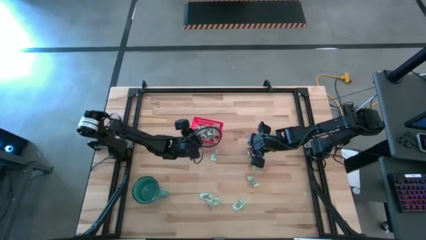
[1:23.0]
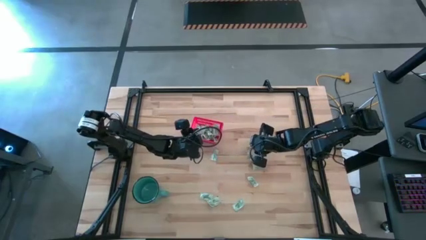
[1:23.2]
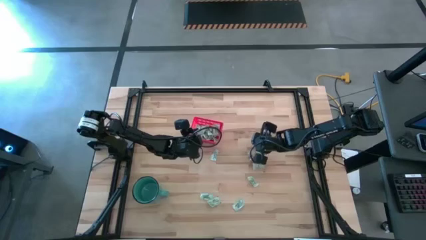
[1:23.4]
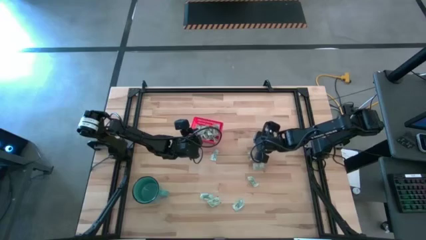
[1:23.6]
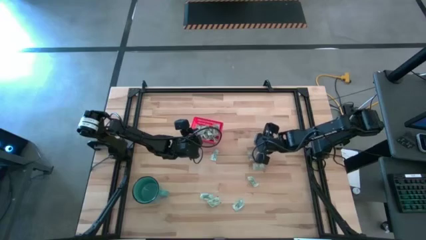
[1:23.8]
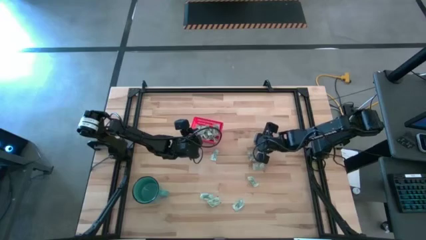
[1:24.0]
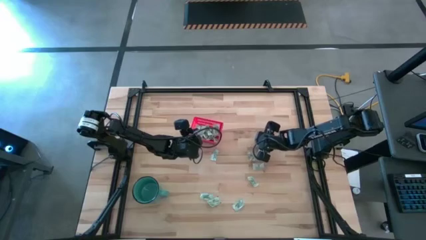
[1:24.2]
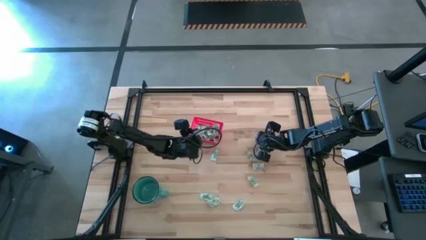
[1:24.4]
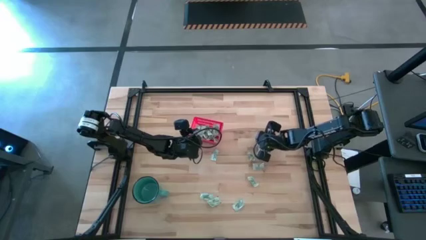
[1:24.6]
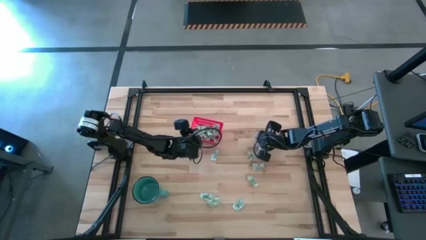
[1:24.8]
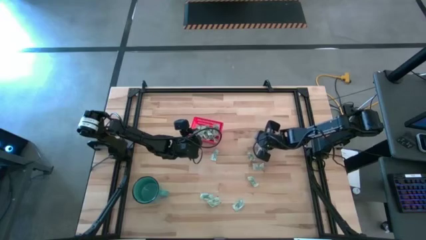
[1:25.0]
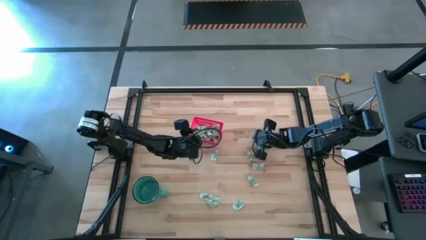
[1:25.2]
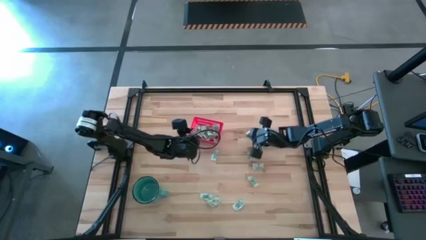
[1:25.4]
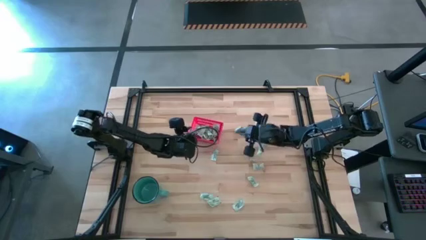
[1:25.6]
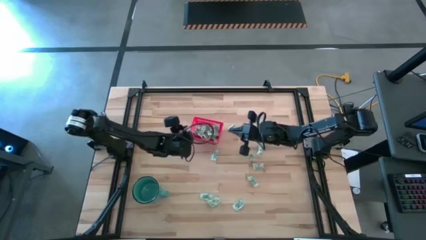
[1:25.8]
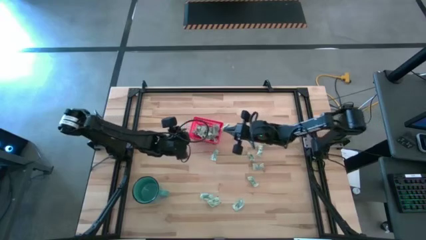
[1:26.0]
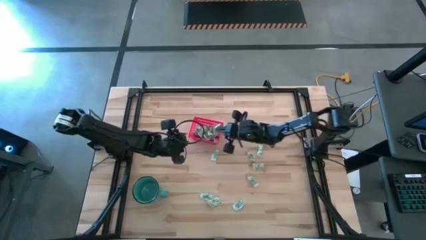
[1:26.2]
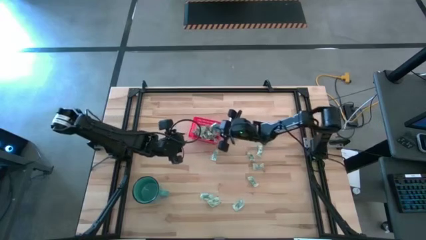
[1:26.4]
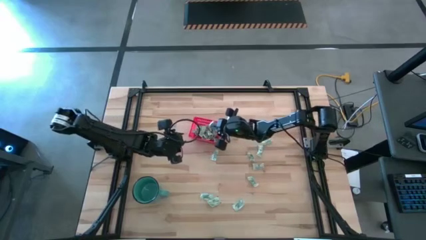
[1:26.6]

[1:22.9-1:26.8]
Task: Pick and place items into bin
Put the stevia packet into the red bin

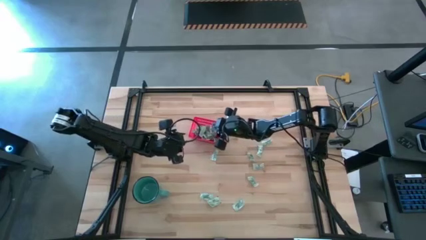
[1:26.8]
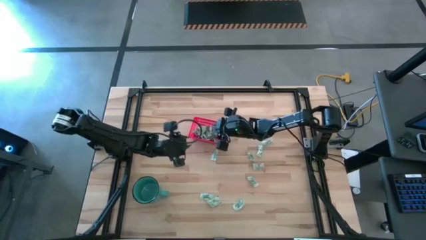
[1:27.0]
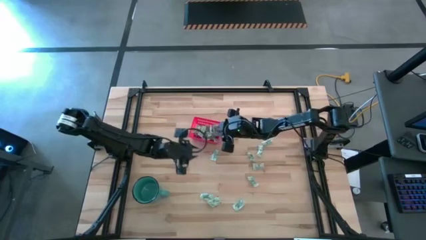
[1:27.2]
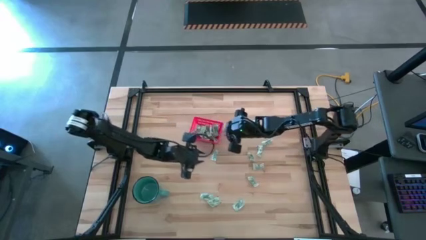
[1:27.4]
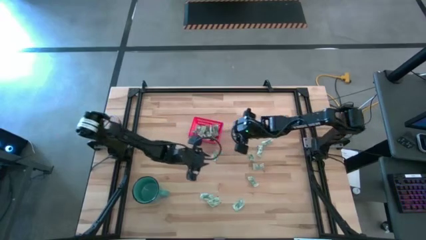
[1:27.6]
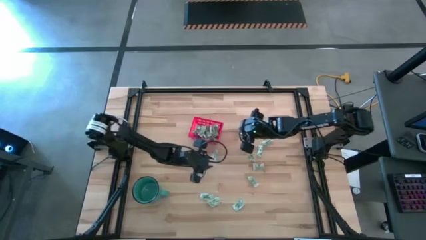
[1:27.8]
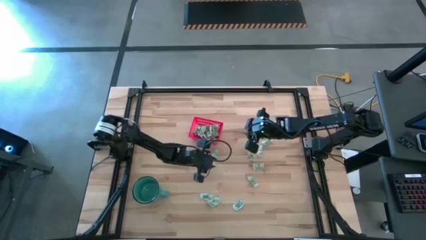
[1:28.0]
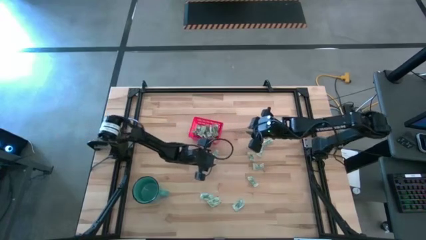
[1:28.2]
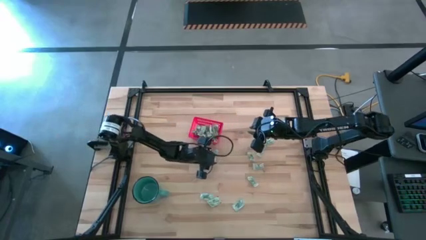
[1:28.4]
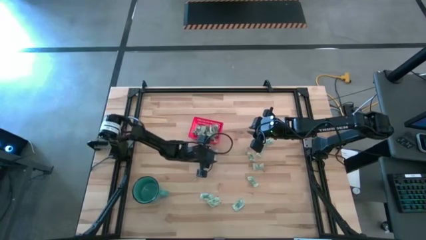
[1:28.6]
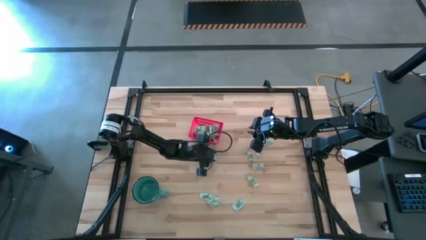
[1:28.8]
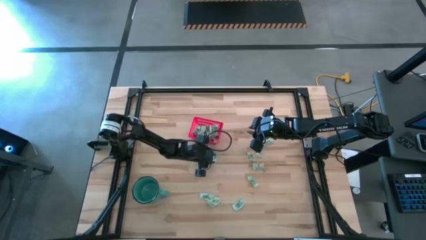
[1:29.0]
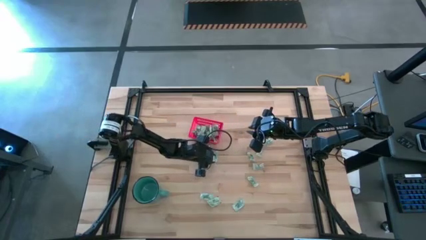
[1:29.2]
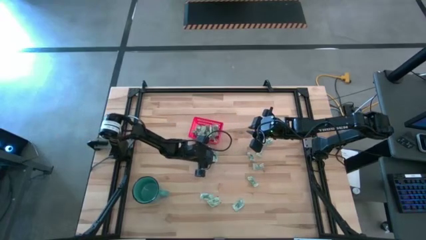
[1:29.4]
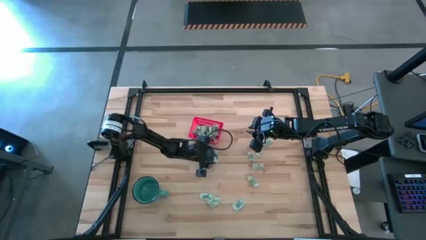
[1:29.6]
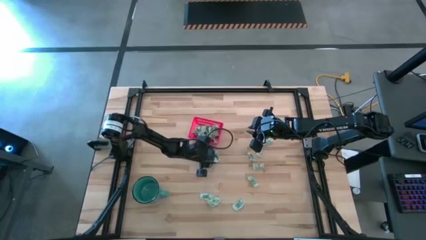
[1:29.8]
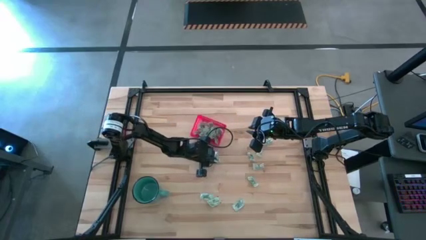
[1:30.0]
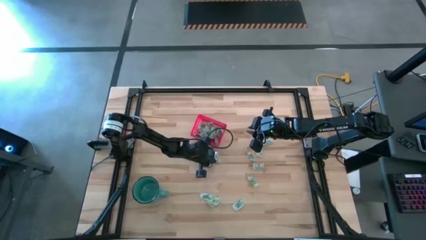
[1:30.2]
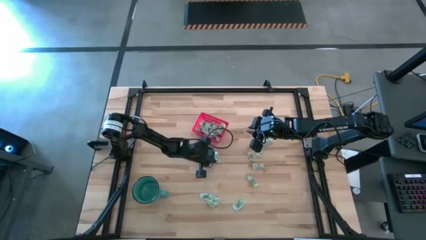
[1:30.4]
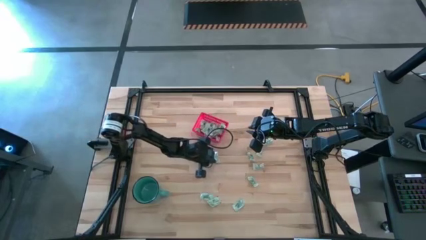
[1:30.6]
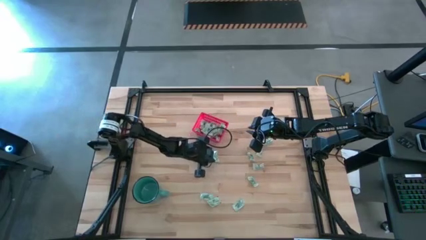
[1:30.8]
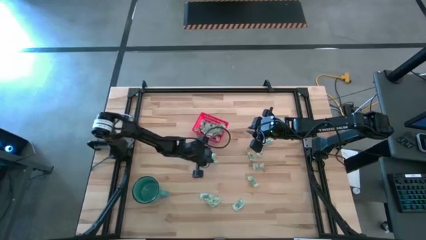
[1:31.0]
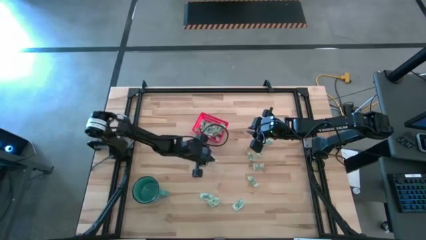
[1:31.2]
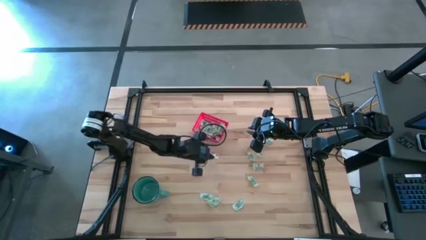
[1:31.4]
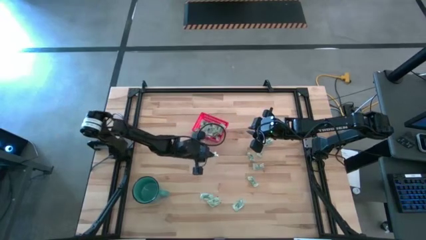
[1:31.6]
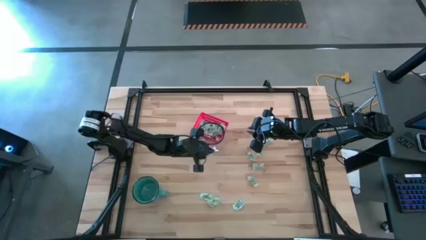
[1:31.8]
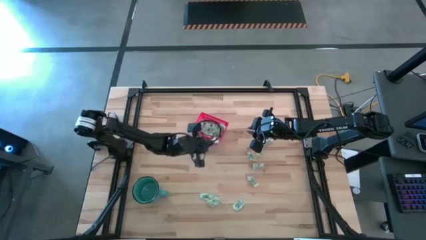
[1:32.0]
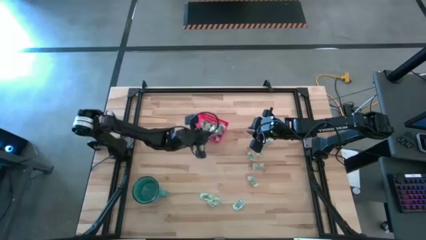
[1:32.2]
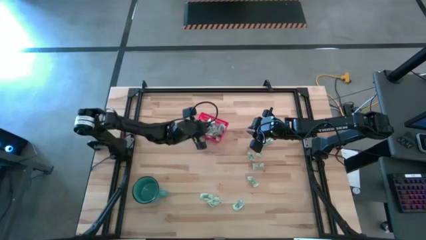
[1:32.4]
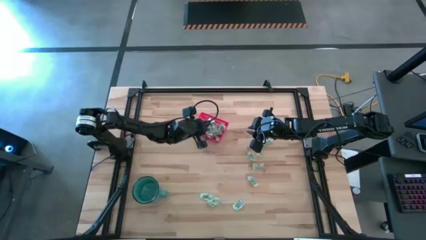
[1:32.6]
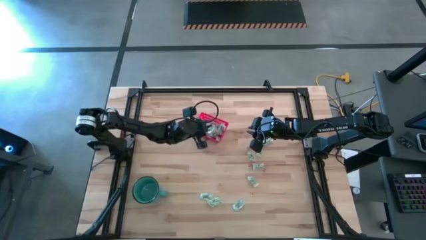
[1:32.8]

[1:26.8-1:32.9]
Put the stevia packet into the red bin

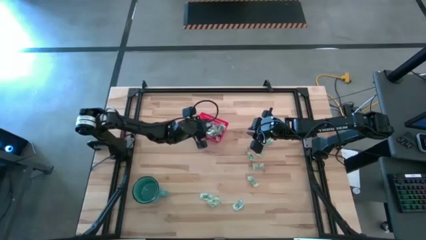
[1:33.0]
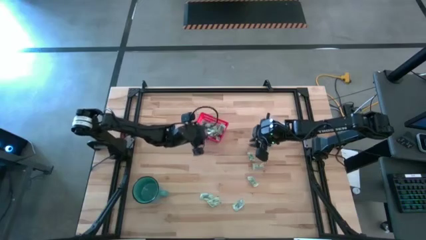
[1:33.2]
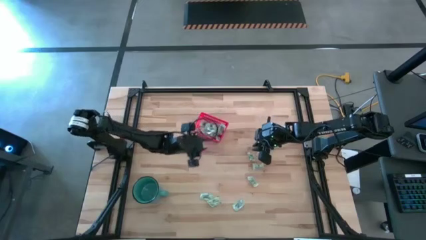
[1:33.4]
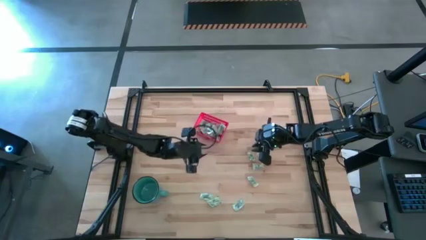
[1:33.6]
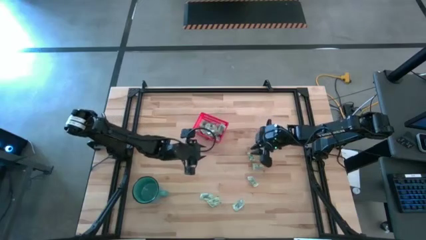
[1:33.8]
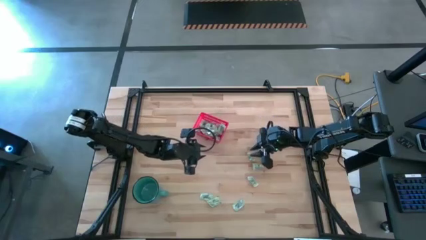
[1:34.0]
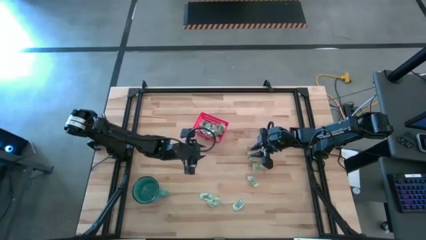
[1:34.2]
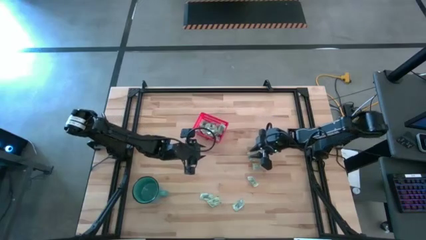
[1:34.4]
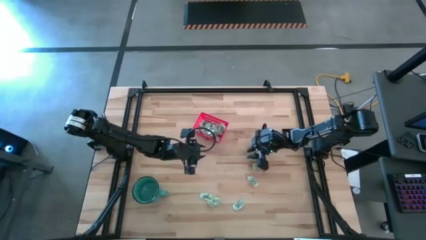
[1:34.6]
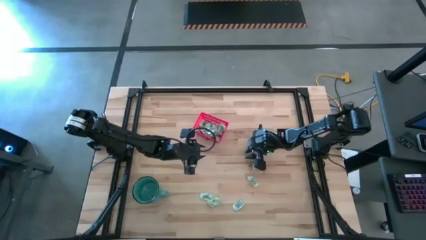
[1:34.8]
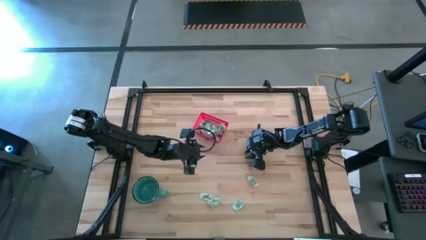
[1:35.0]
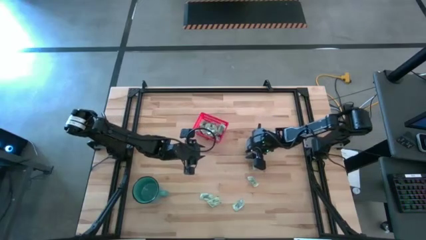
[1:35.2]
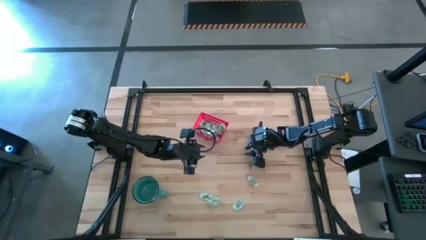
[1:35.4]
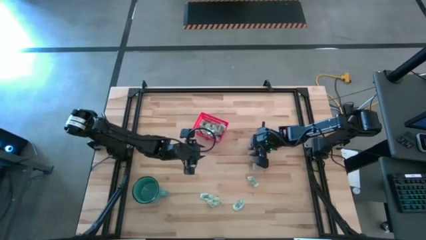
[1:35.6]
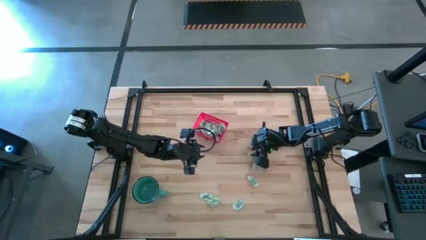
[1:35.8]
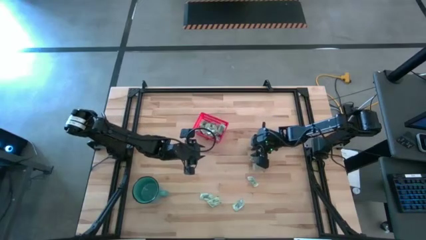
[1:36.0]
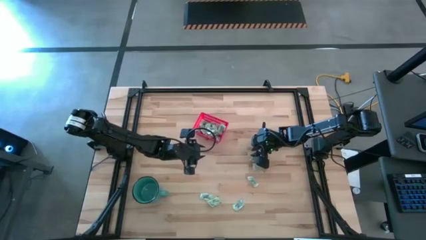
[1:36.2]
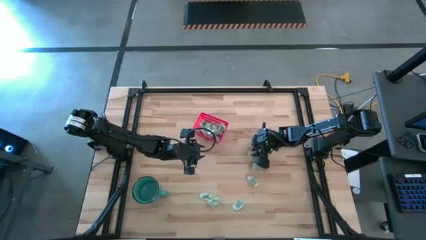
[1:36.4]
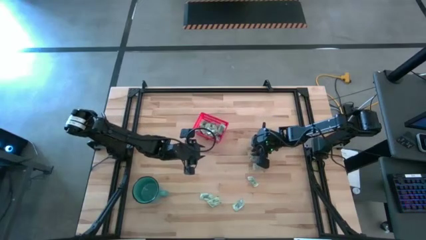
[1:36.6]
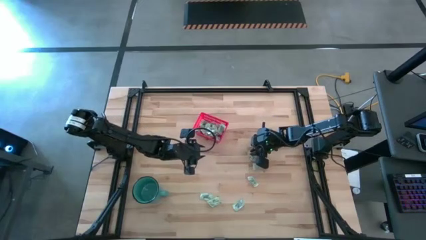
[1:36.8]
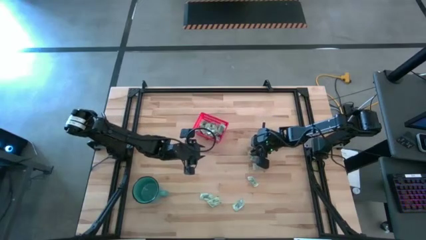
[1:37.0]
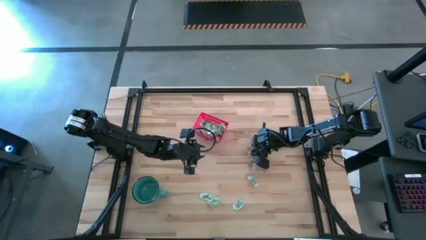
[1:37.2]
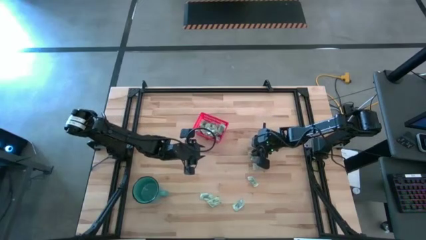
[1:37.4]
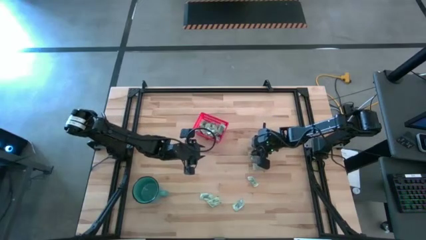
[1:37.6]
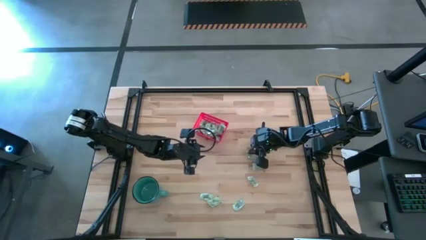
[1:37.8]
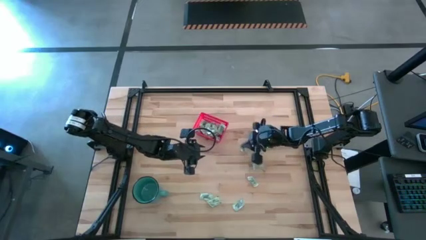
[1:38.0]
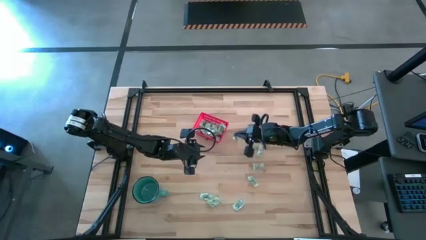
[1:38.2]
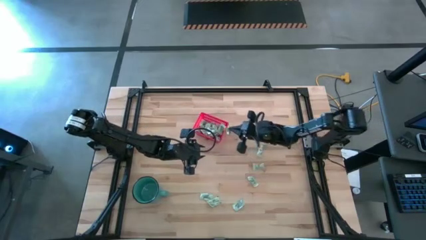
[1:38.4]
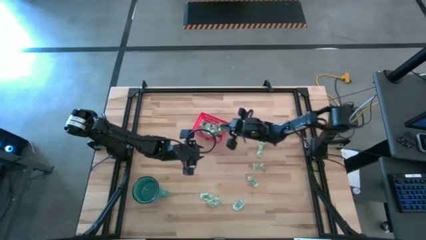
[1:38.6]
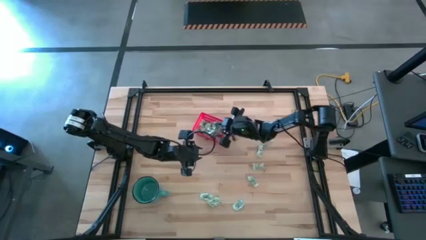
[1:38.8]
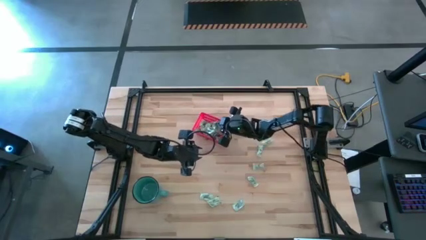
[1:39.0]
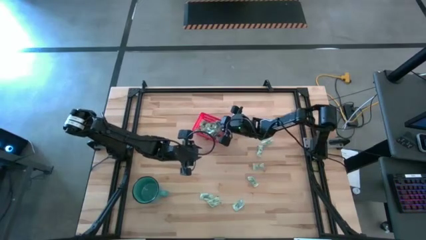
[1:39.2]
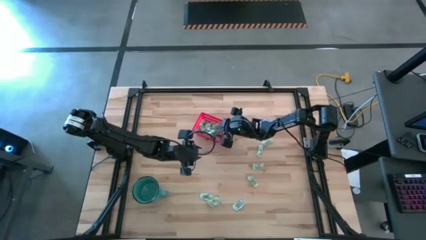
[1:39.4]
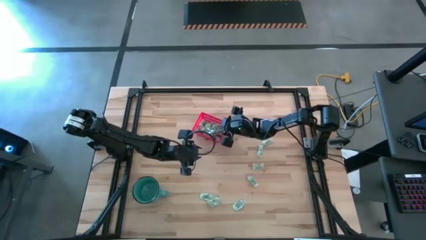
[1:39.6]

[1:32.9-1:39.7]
Put the stevia packet into the red bin
